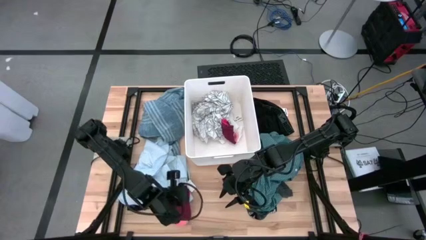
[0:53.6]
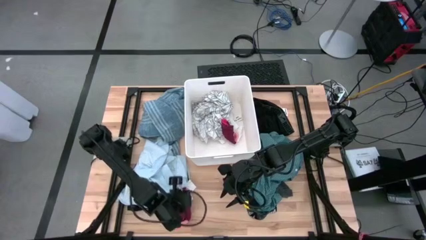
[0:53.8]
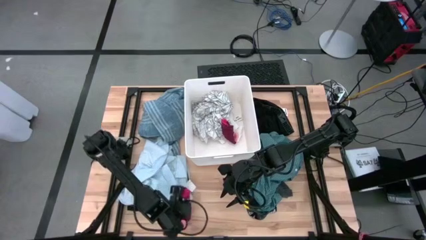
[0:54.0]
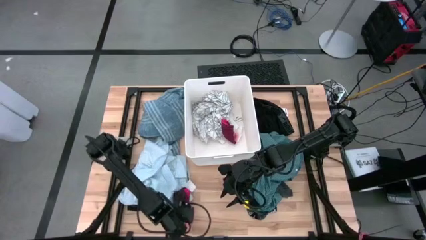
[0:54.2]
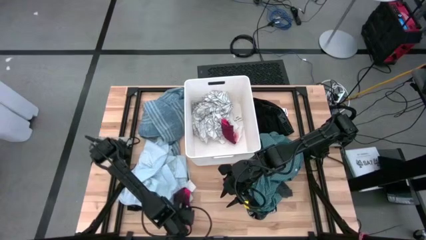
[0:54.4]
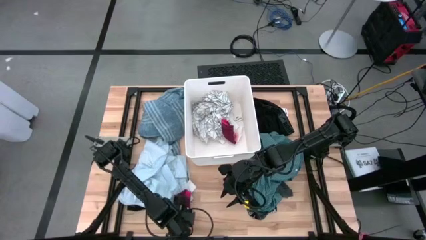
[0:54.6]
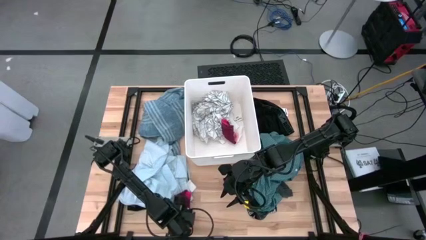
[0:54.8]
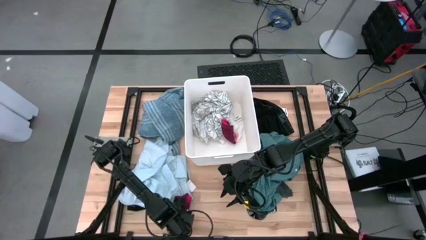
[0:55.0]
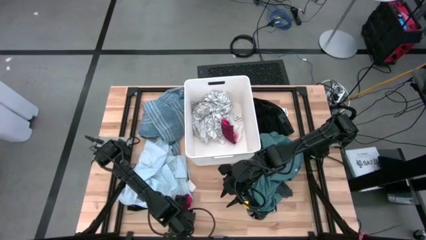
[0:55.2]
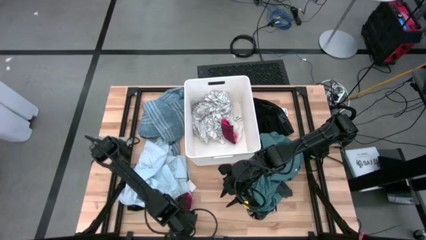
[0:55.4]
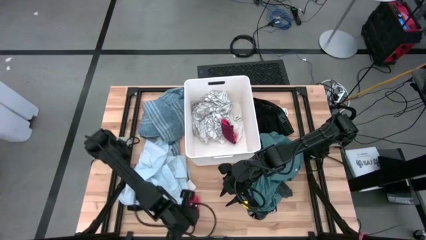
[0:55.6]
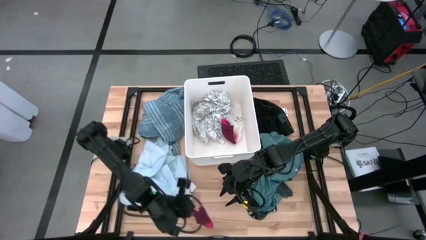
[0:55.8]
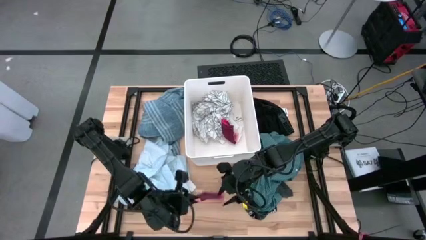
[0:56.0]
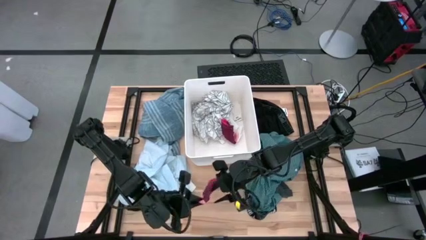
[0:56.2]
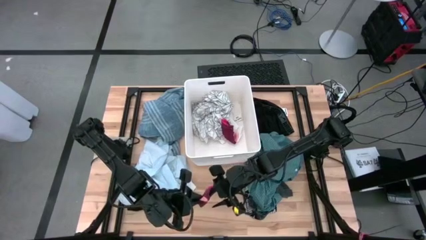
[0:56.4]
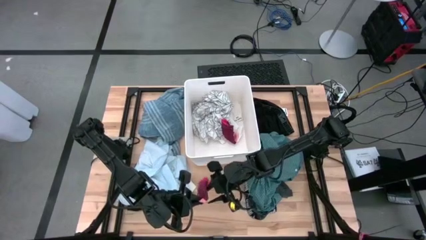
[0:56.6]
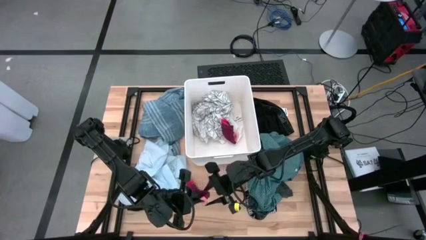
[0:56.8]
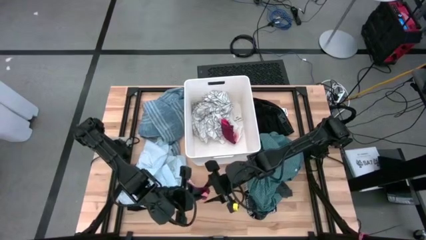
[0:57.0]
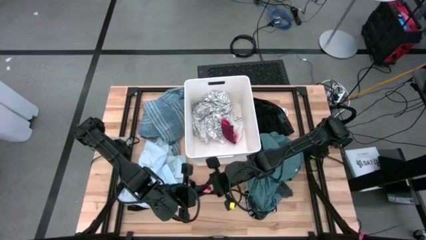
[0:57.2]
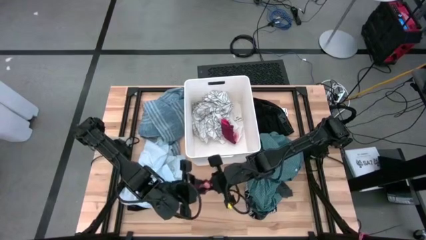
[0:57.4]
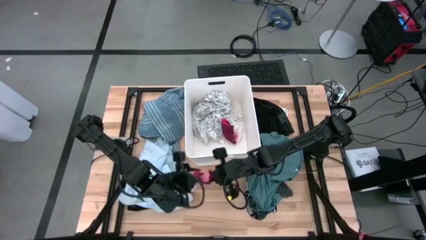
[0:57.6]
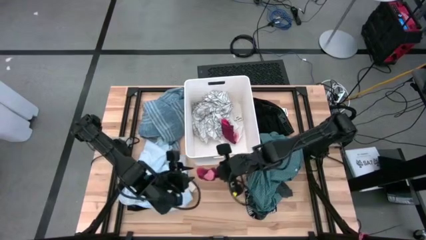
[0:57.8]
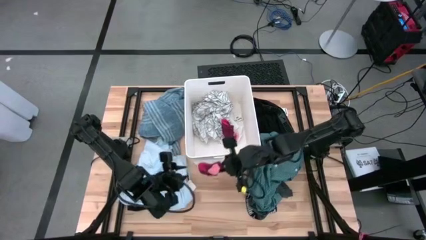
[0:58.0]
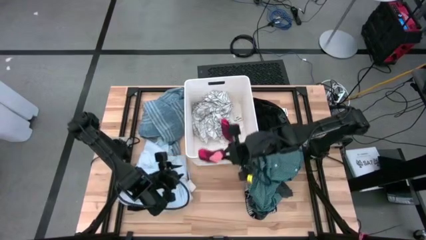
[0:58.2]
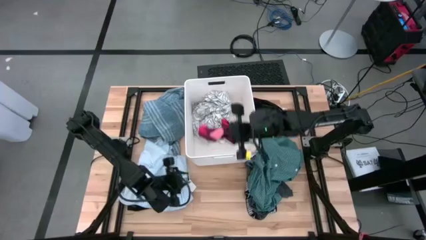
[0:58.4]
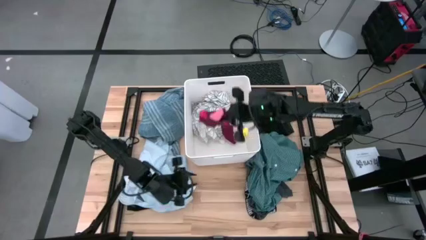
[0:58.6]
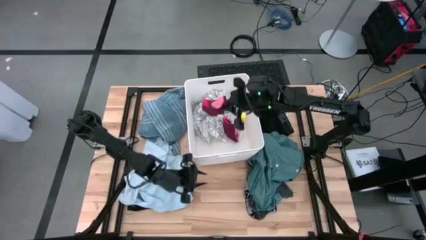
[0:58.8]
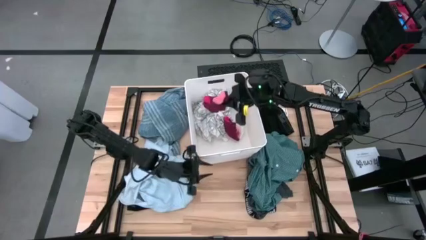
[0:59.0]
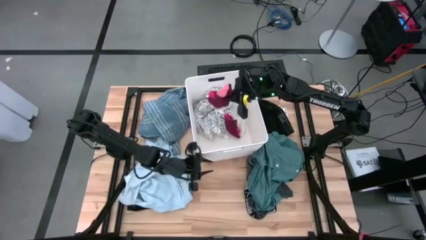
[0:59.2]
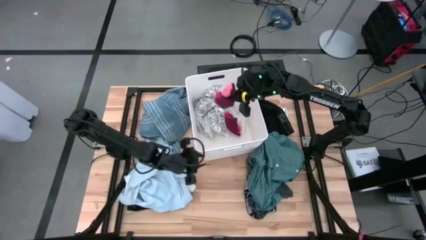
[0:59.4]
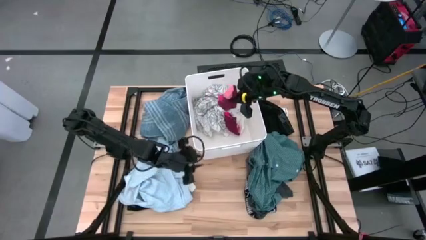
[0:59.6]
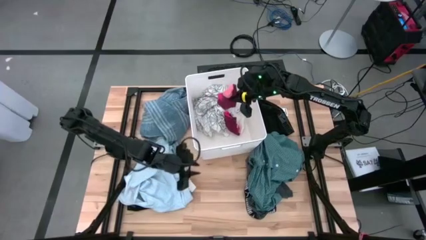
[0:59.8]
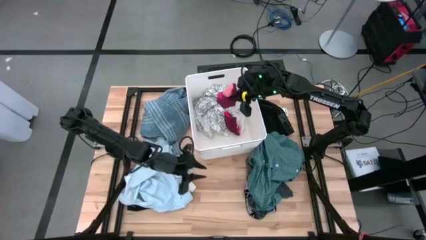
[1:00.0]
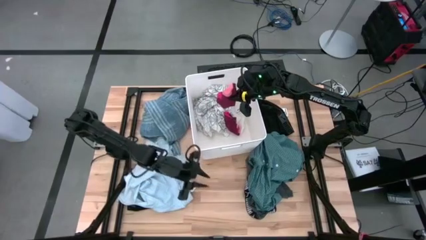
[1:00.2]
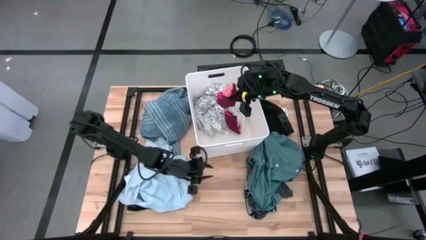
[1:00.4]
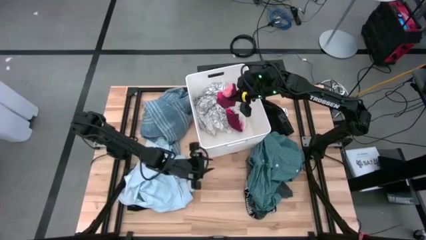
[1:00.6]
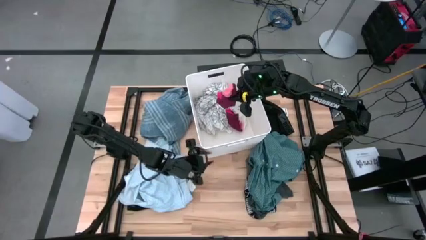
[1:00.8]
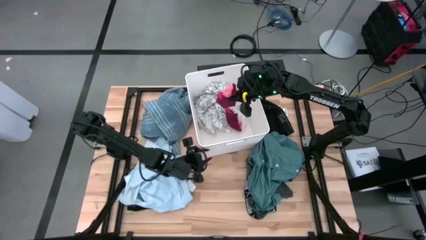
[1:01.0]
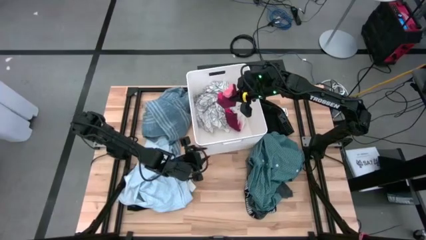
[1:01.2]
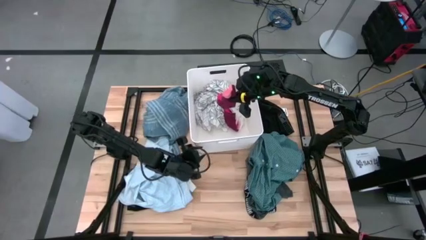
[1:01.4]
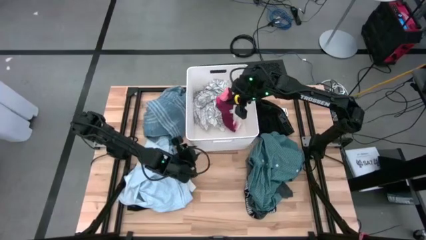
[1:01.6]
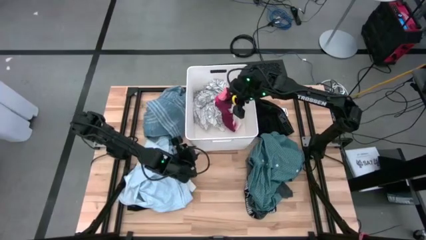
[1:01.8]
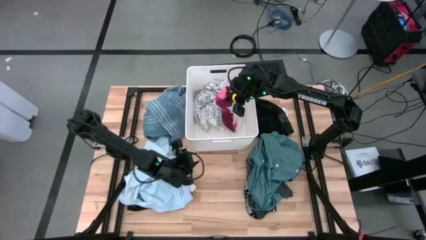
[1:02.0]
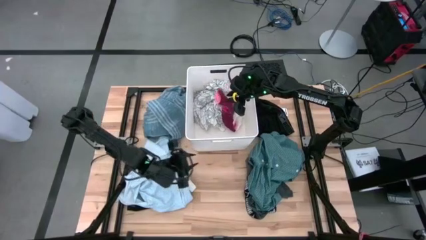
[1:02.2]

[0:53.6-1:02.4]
Task: Sort clothes
Put the red sock into the white bin

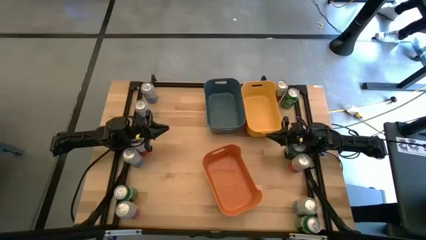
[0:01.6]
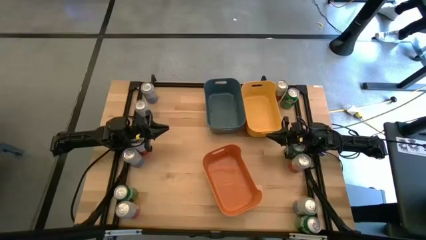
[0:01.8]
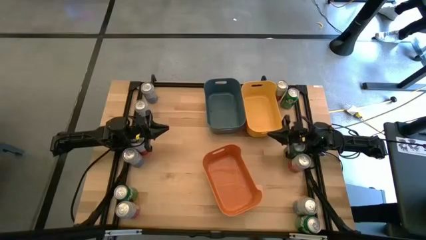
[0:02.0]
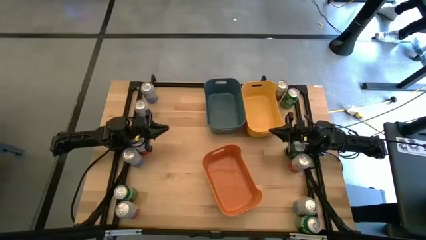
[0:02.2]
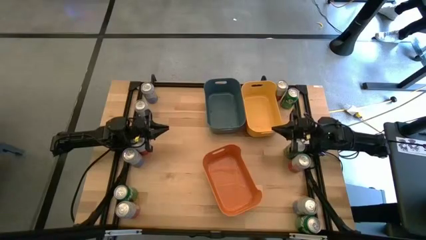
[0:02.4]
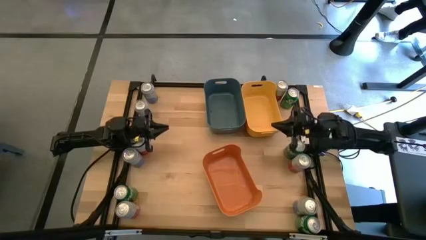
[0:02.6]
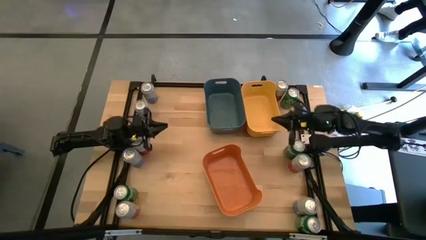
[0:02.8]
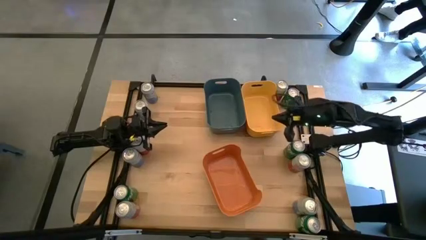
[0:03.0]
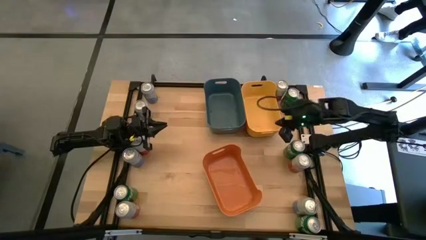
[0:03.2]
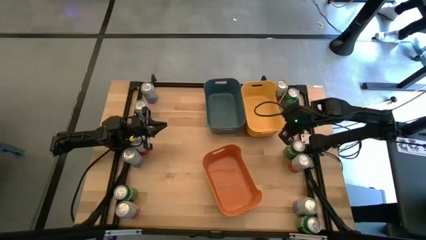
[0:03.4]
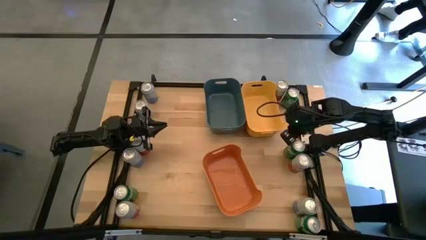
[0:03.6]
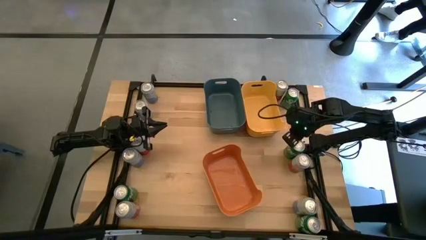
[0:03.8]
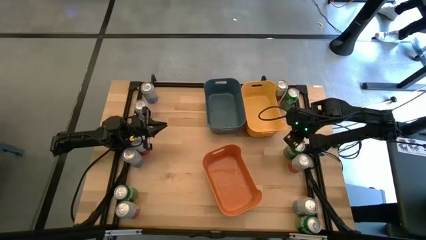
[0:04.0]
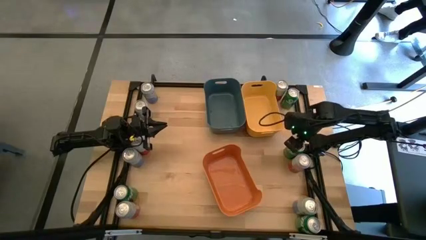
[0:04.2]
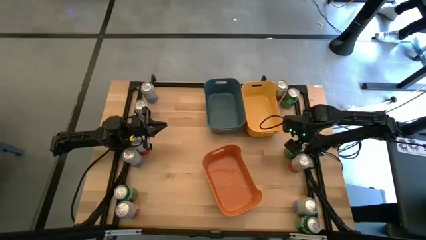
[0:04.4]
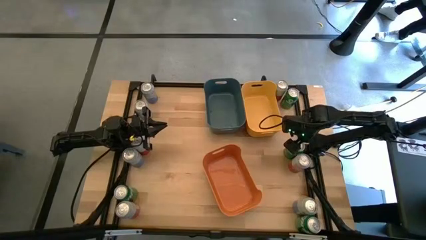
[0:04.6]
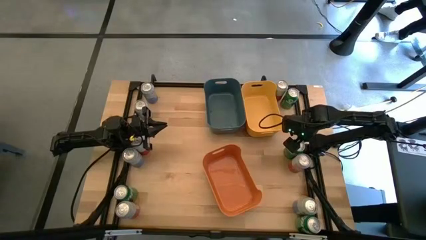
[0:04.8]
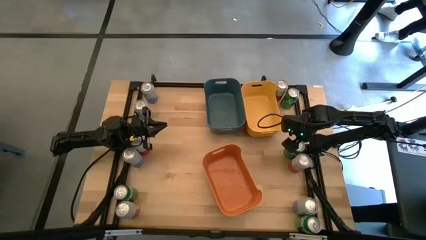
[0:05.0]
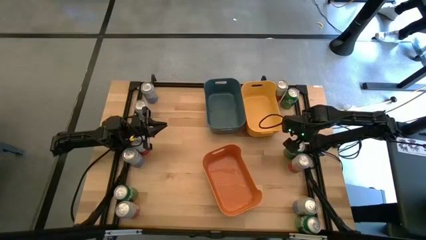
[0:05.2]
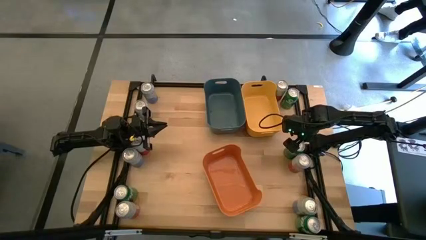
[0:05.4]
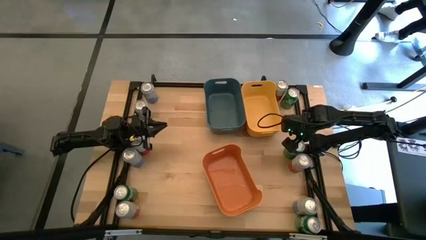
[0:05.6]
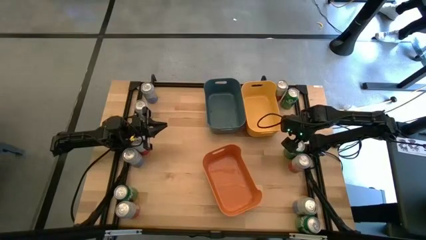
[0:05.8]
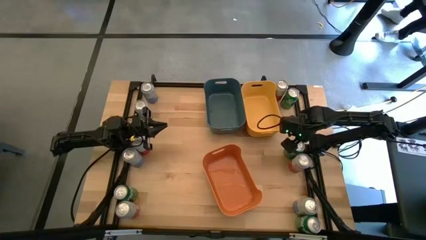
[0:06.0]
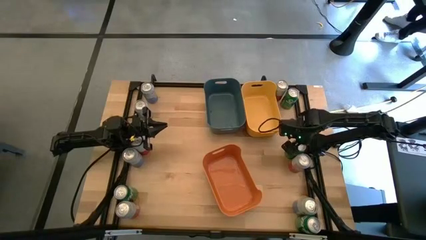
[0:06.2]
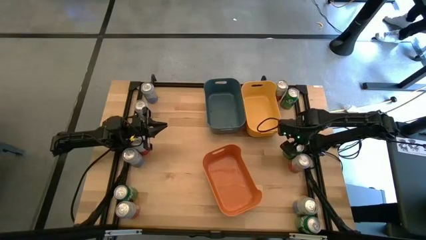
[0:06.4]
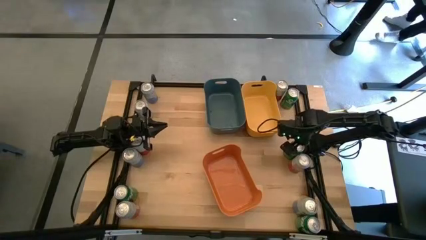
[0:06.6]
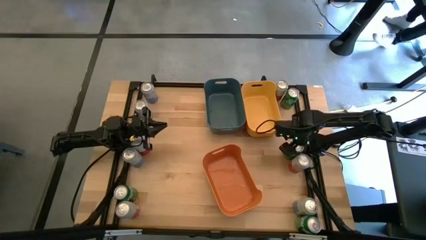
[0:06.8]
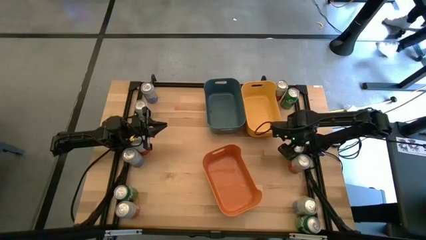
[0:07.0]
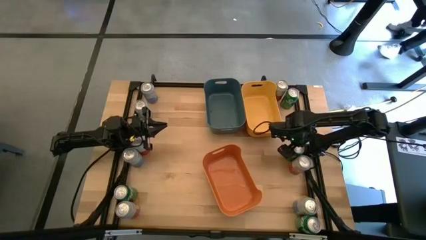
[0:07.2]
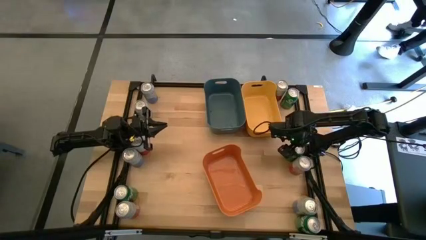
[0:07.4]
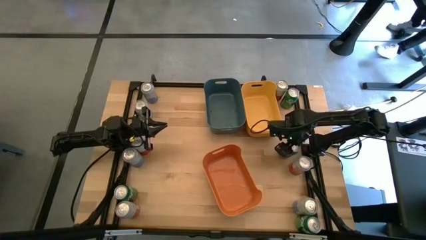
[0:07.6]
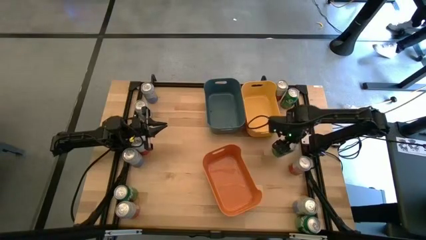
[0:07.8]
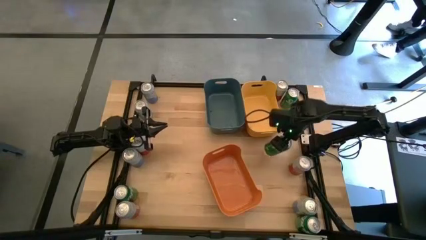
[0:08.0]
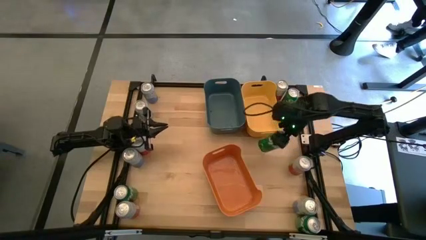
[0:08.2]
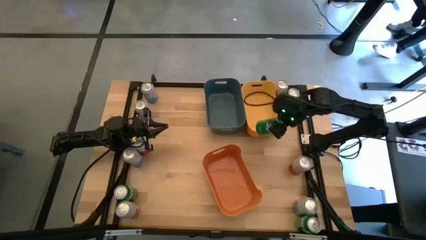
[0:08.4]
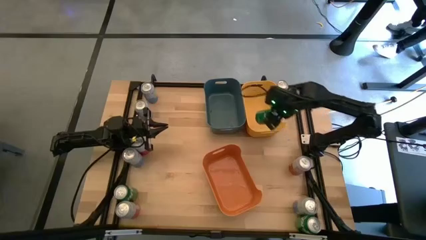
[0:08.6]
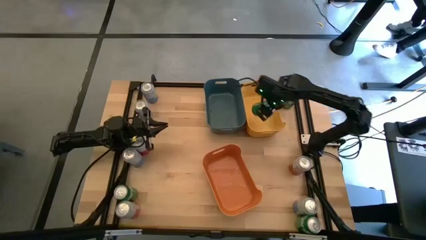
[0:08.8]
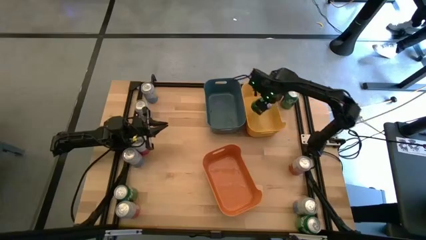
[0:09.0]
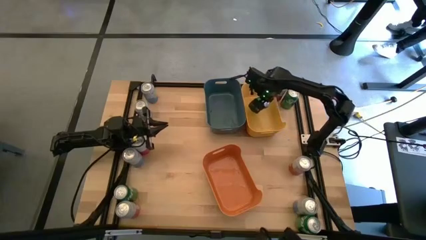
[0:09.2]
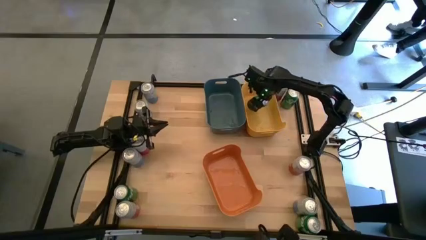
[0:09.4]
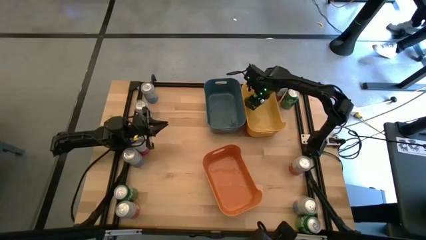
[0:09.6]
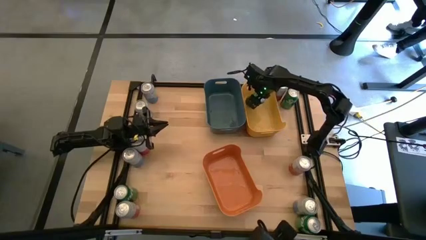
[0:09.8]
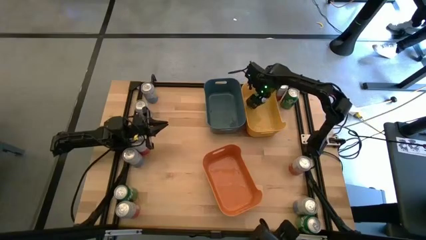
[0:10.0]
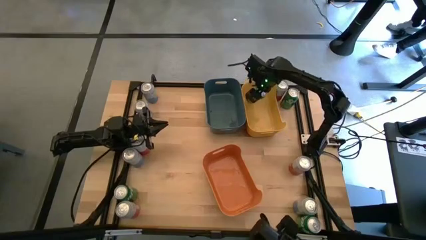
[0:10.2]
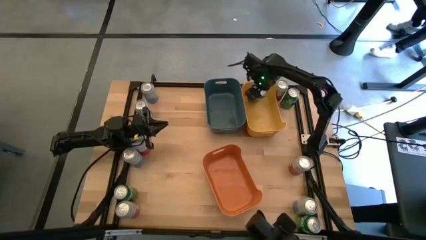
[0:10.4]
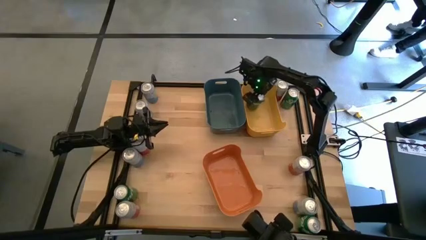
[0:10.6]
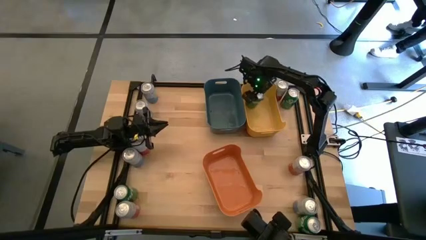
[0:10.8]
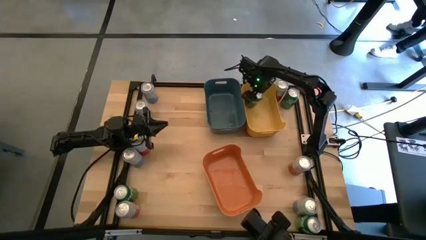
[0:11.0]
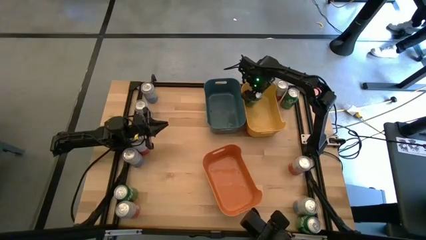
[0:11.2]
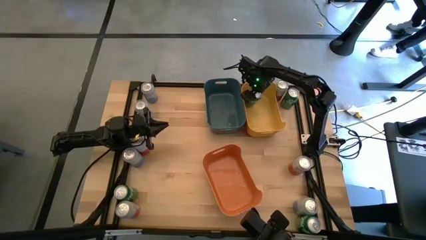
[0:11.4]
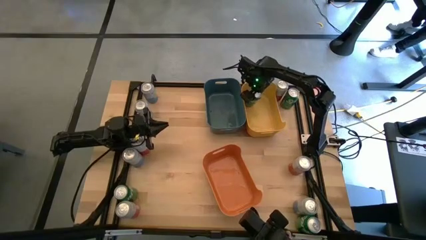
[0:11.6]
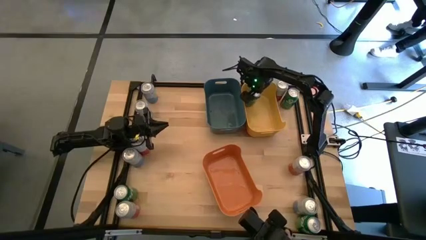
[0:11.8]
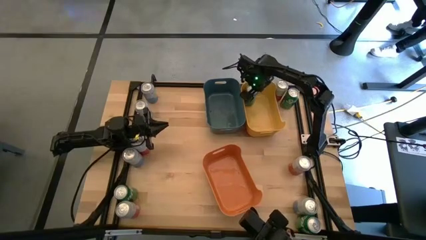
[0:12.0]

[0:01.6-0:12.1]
Task: Sort soda cans
Put the green soda can into the yellow bin
